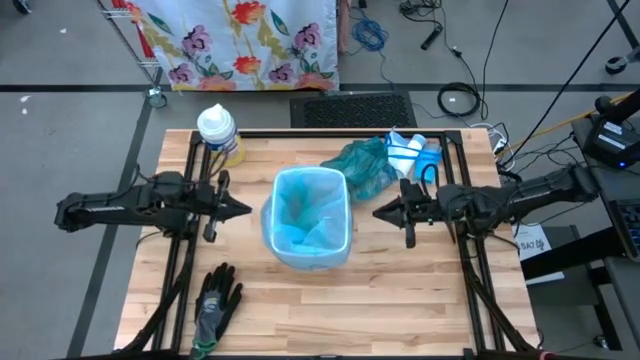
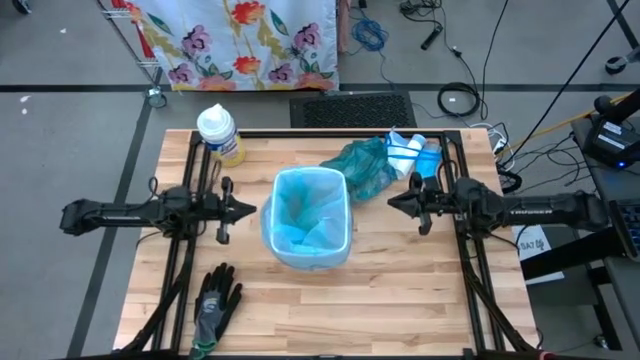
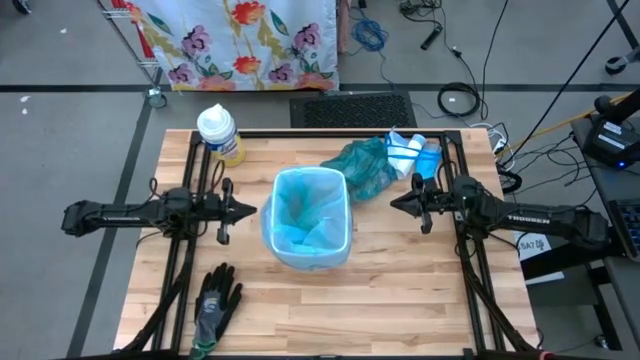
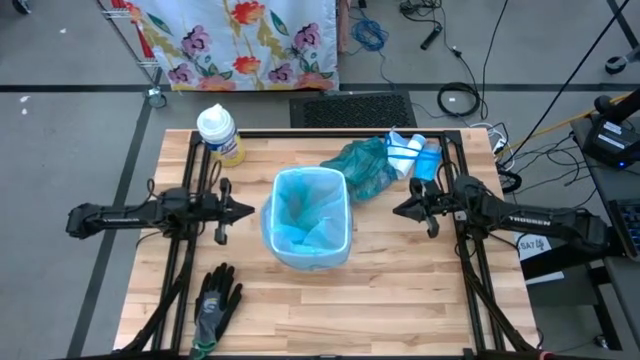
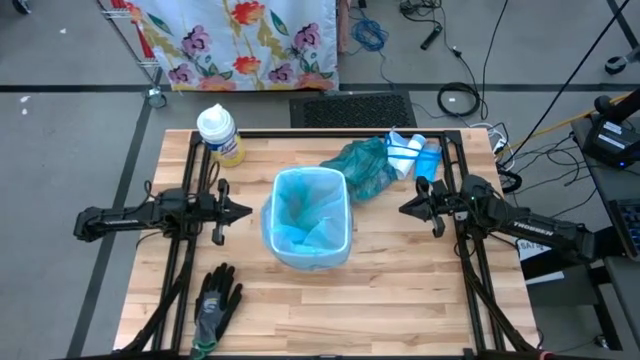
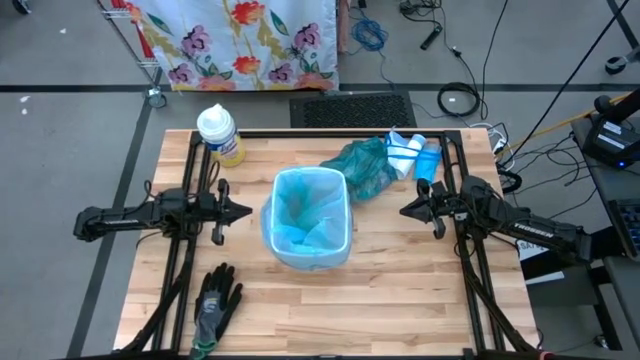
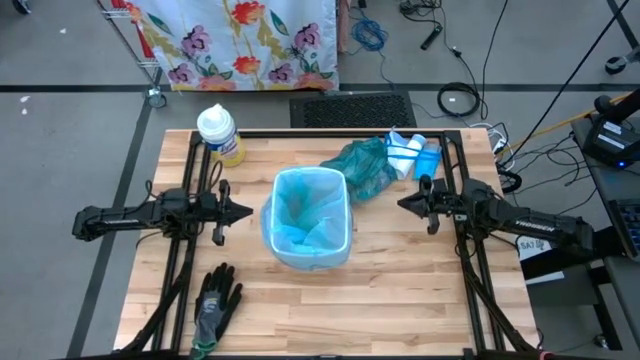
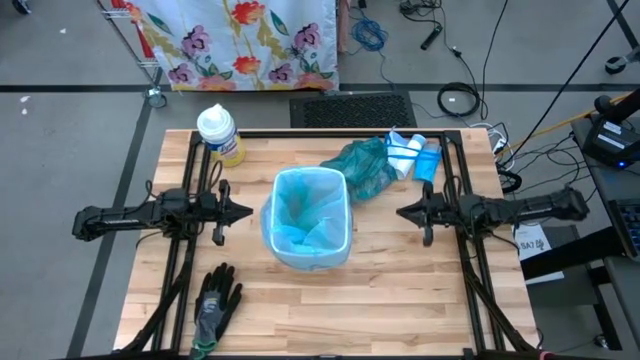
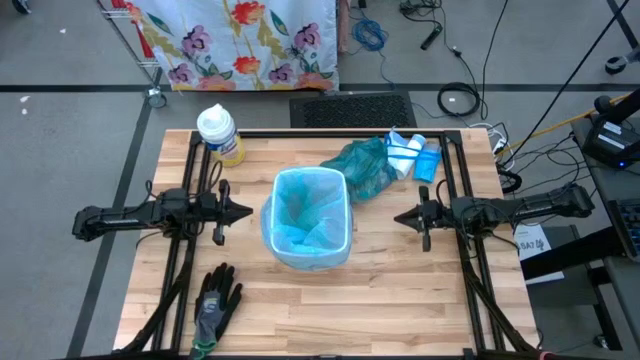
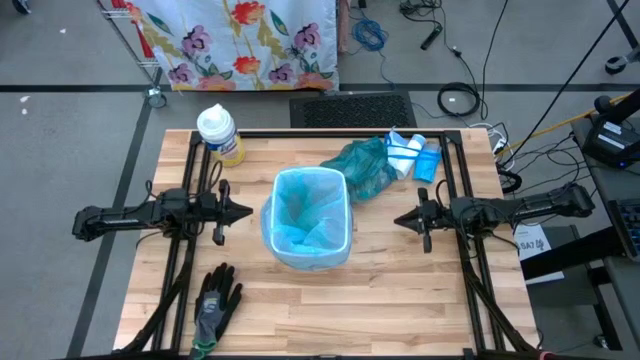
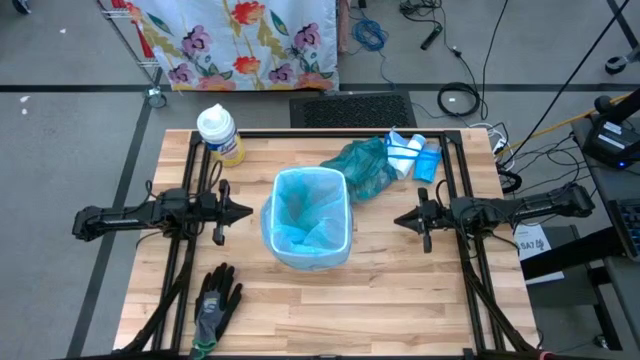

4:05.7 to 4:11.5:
Task: place trash/remove bag and relplace
Return to Home Position

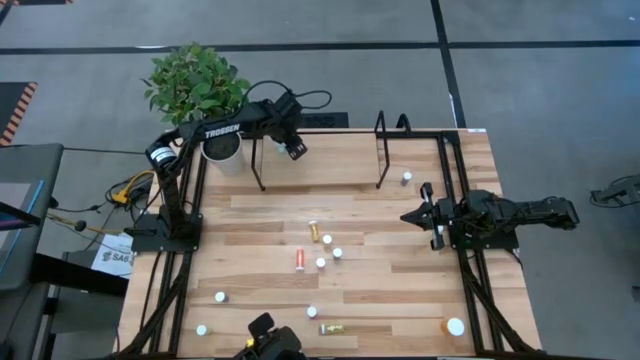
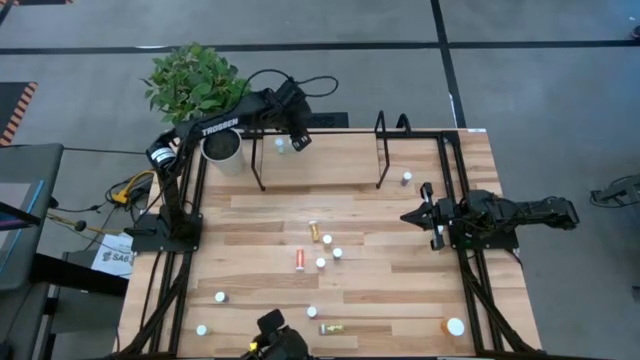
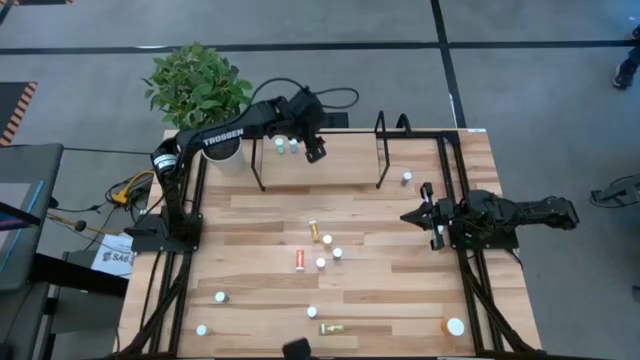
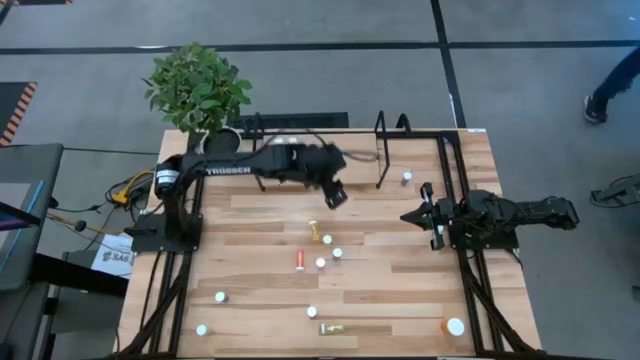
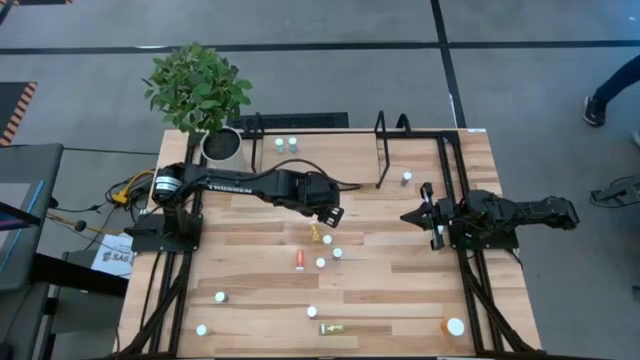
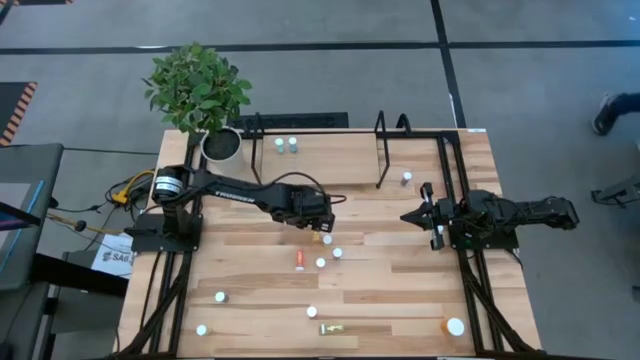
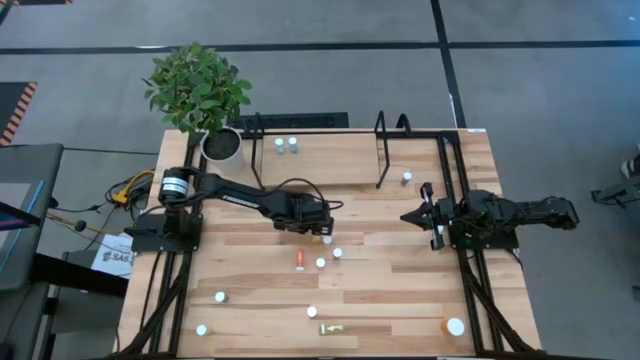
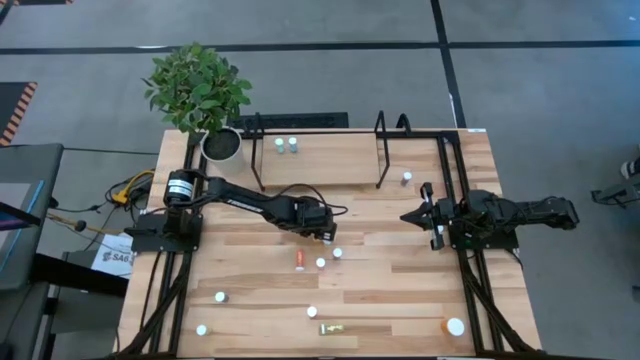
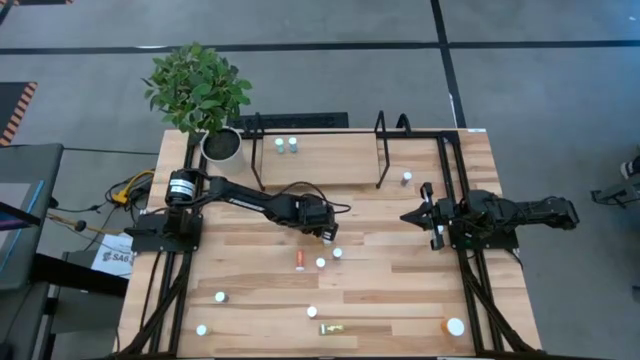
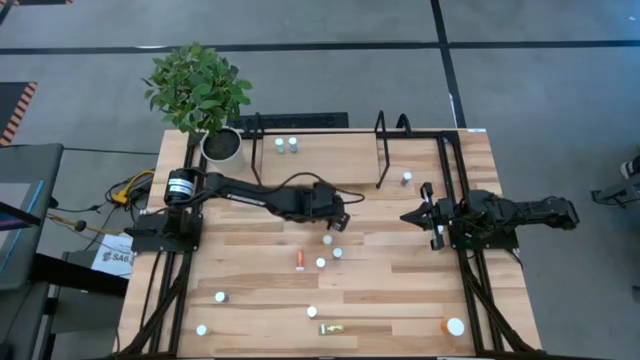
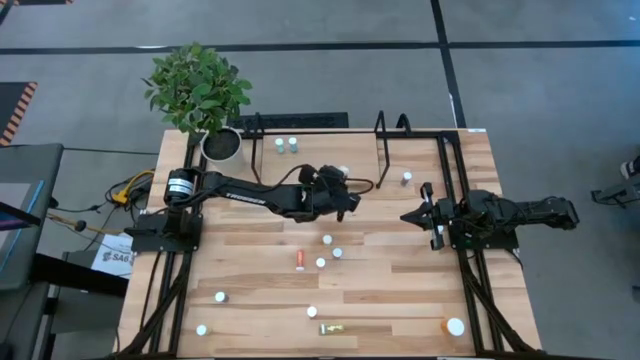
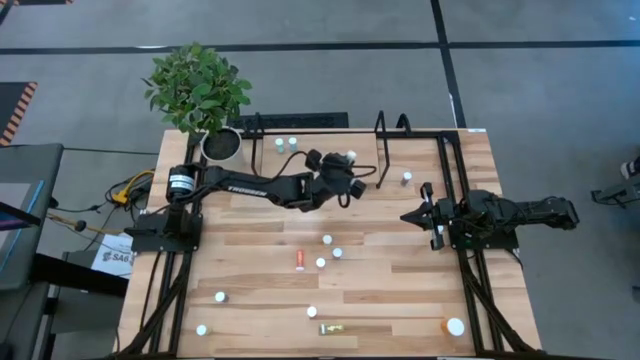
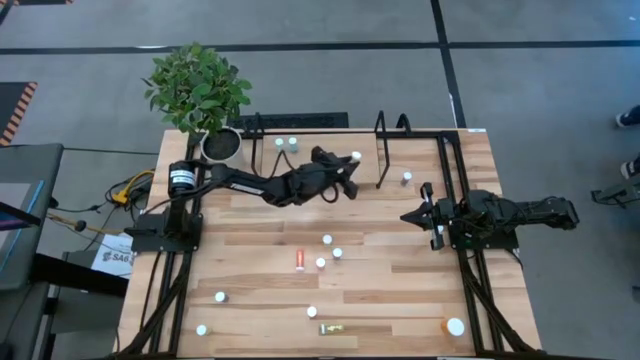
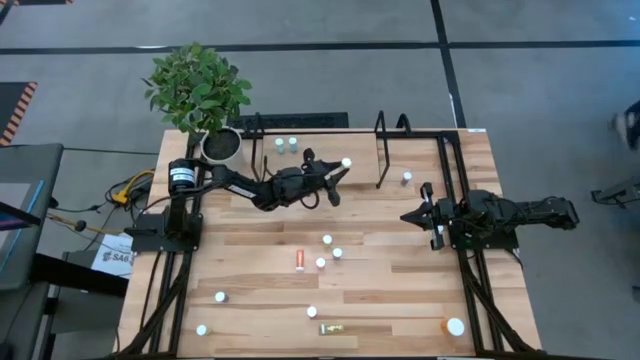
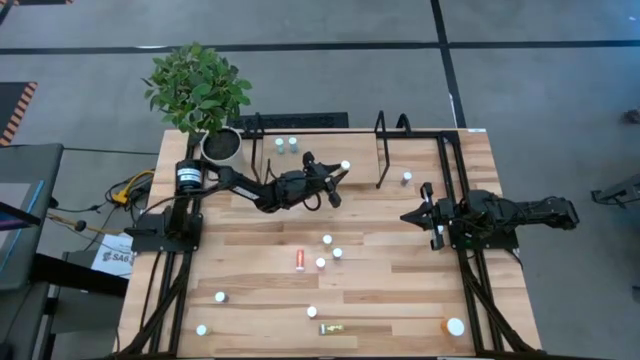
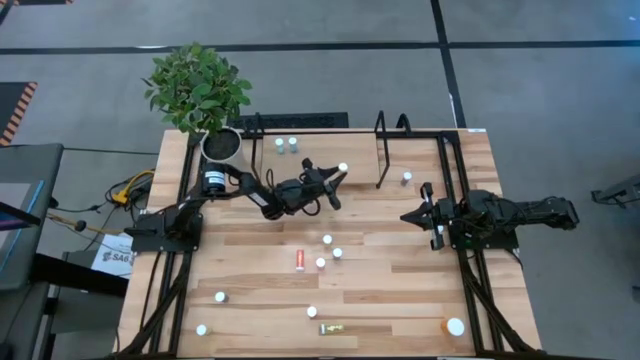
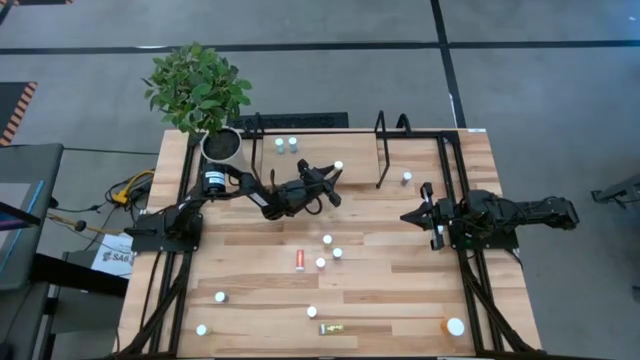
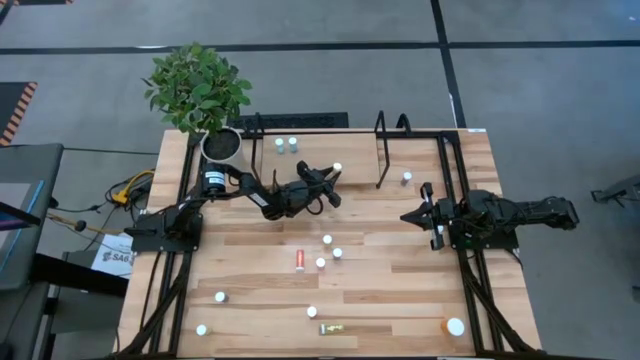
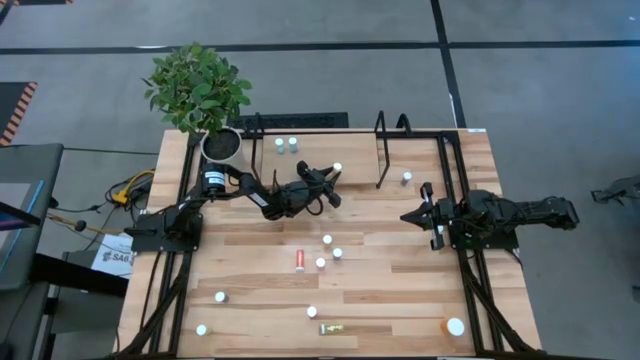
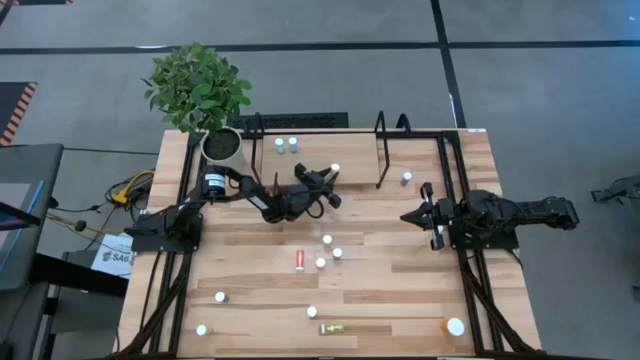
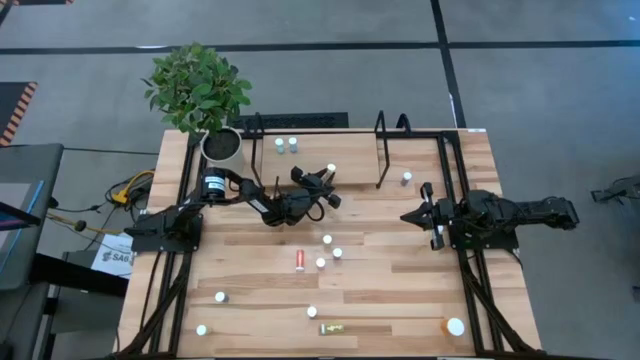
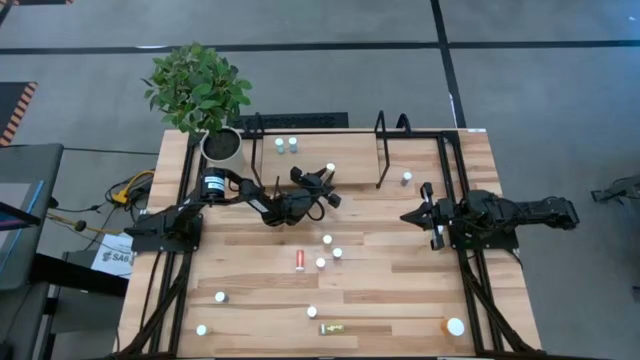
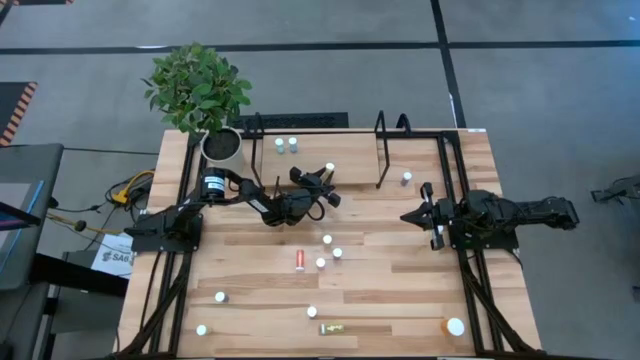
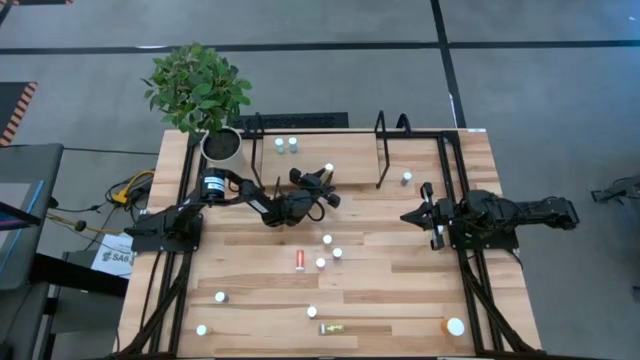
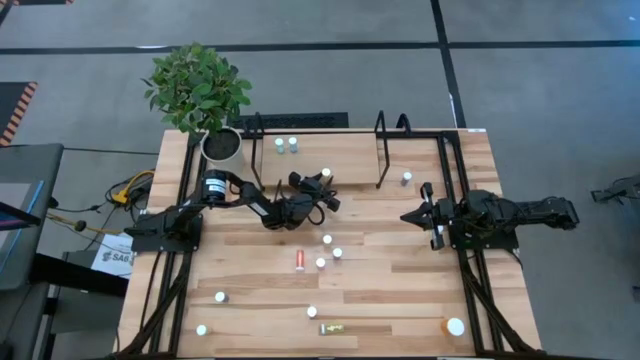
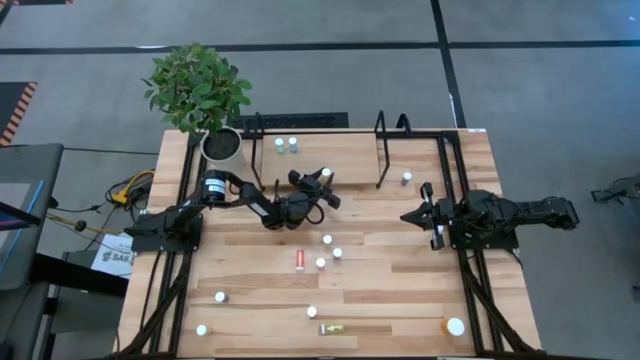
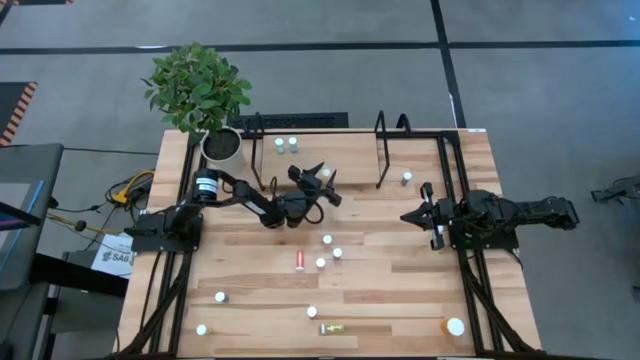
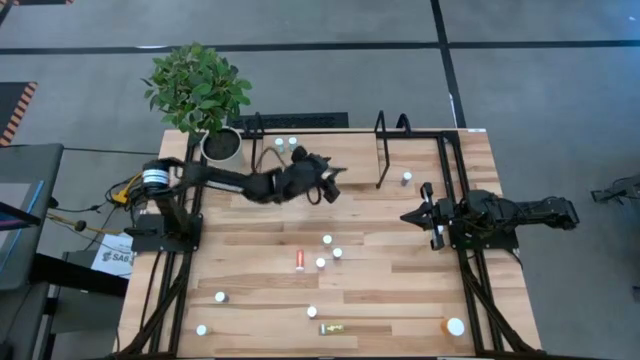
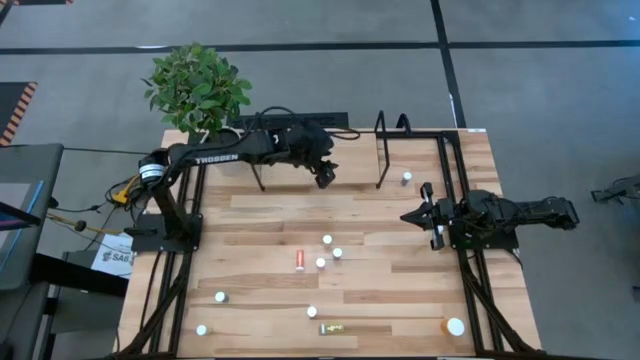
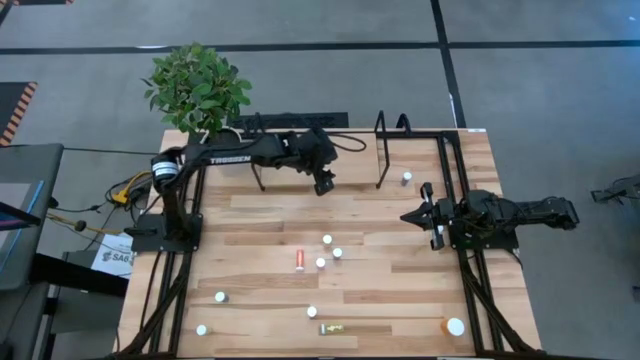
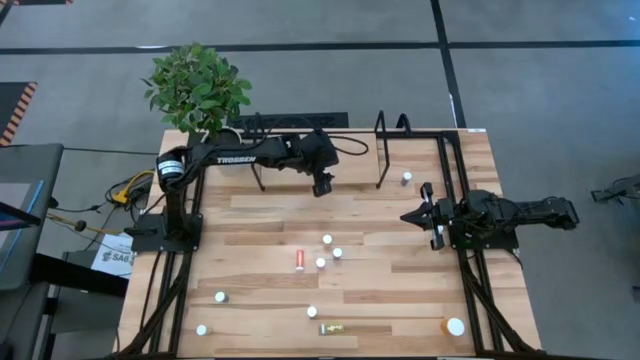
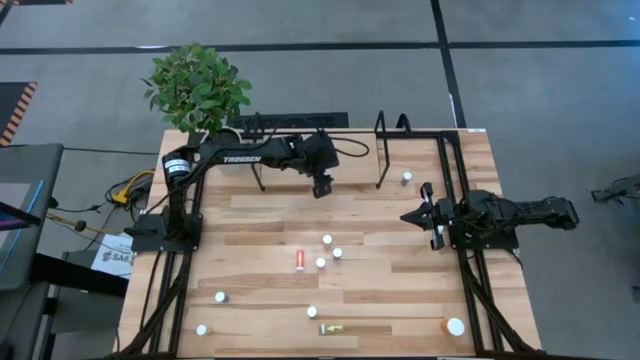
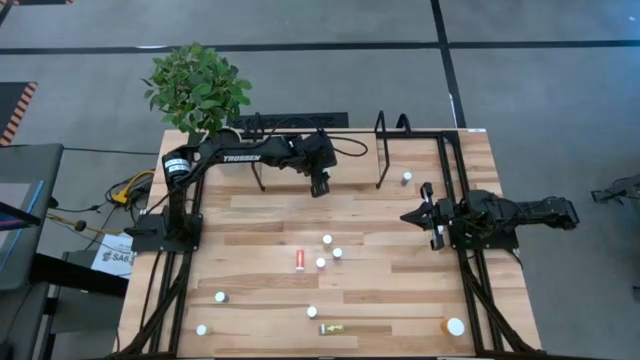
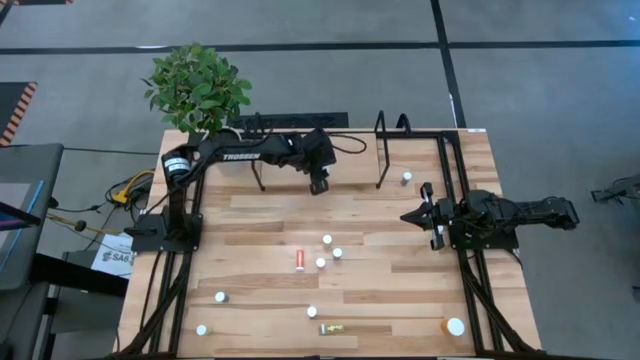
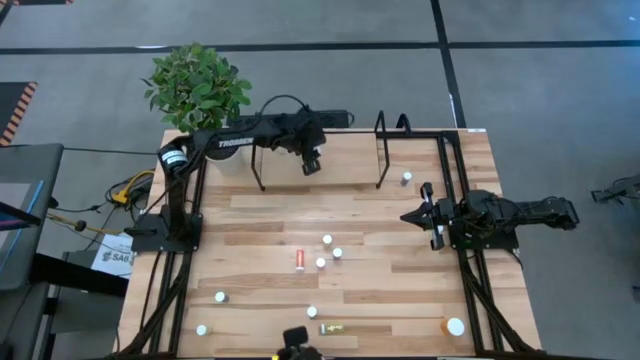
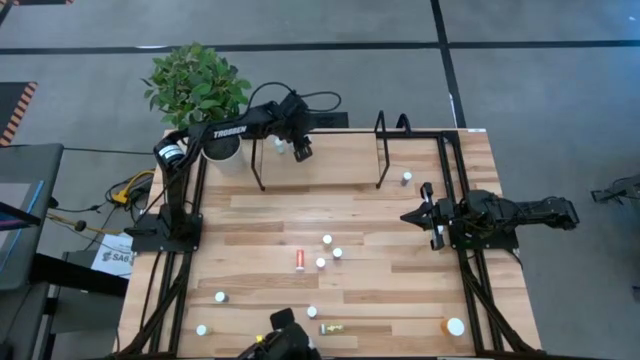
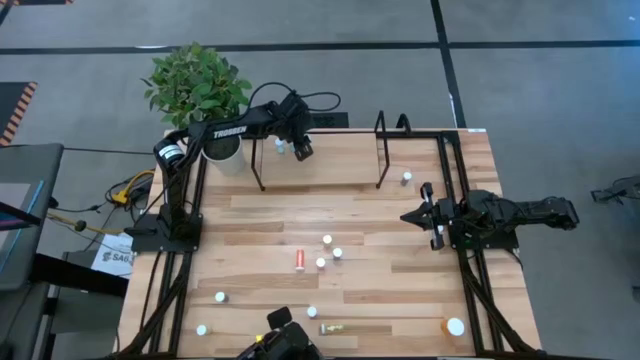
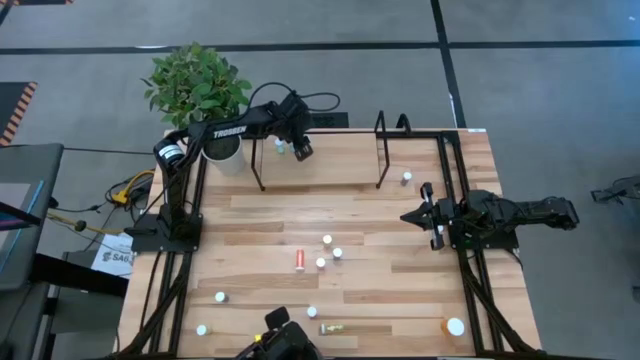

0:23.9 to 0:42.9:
Task: Pick and place medicine bottles onto shelf by color
Put the yellow pill bottle on the shelf
